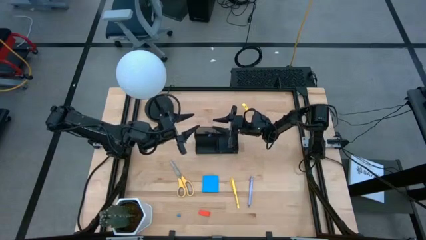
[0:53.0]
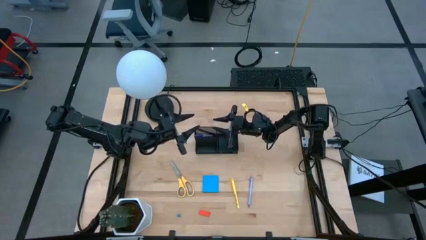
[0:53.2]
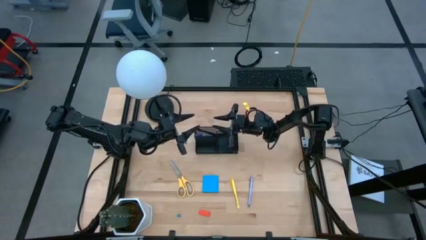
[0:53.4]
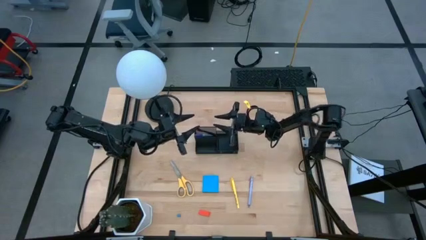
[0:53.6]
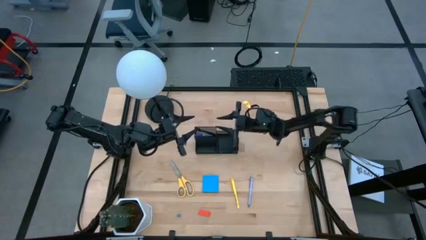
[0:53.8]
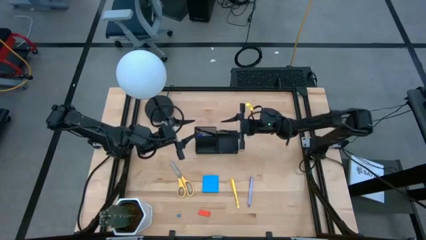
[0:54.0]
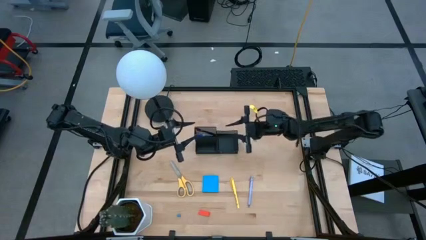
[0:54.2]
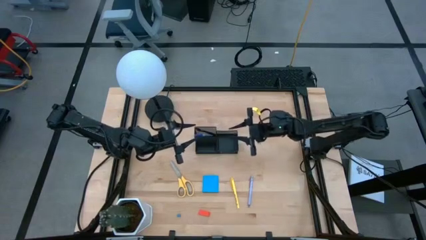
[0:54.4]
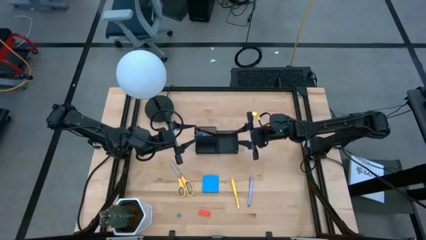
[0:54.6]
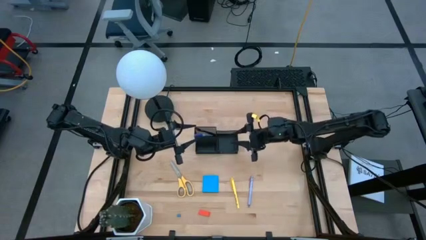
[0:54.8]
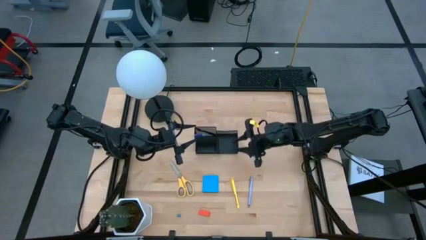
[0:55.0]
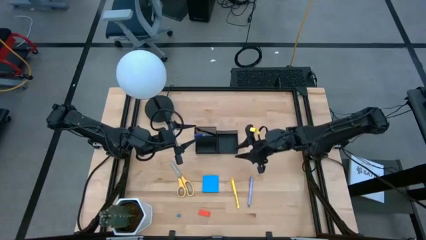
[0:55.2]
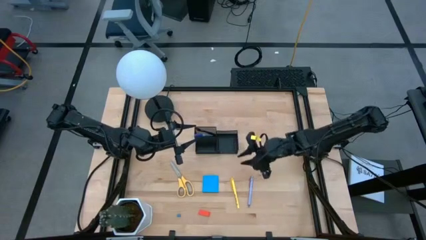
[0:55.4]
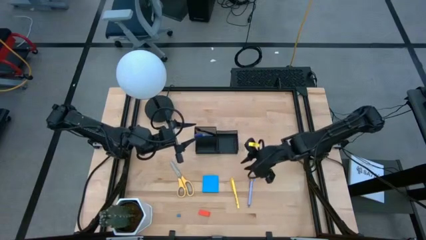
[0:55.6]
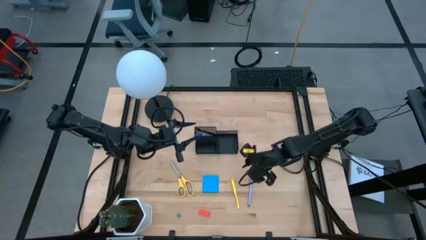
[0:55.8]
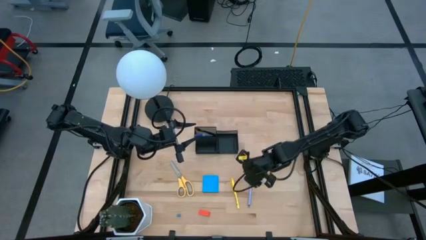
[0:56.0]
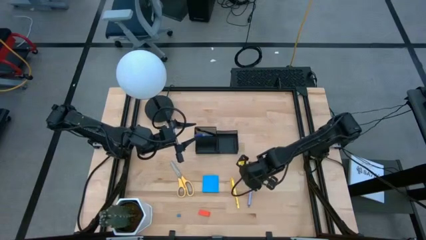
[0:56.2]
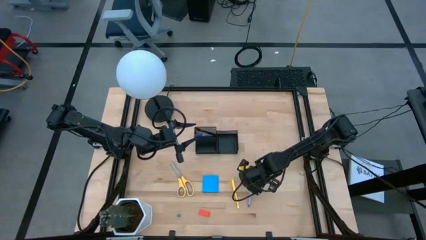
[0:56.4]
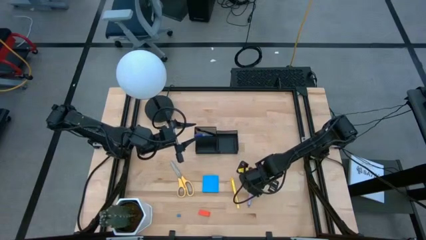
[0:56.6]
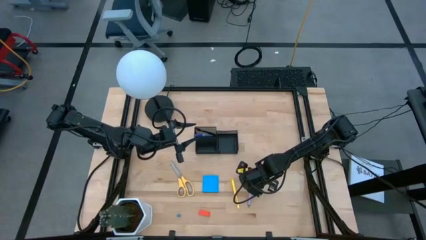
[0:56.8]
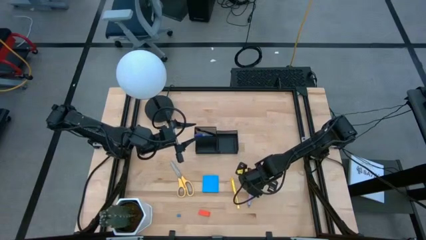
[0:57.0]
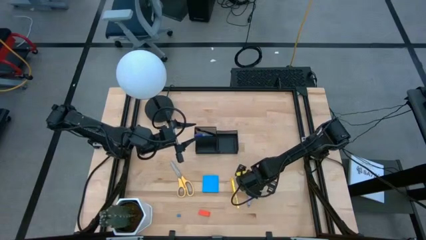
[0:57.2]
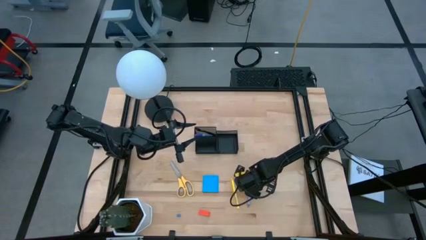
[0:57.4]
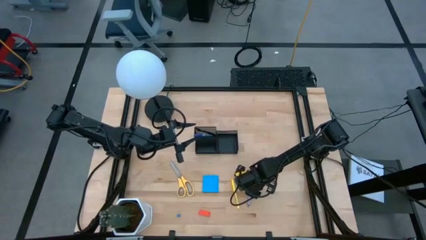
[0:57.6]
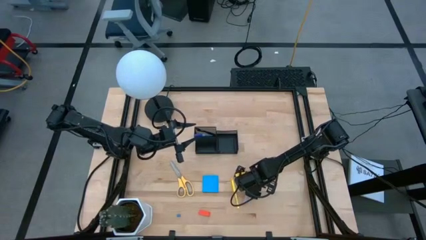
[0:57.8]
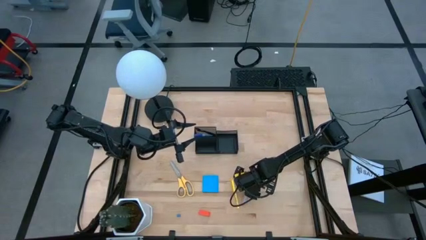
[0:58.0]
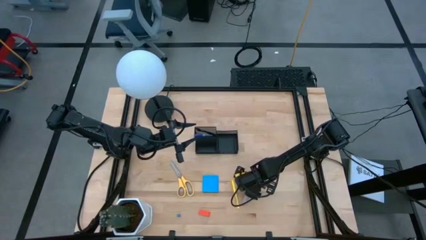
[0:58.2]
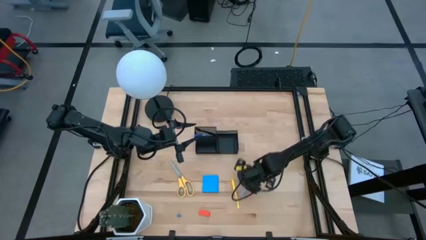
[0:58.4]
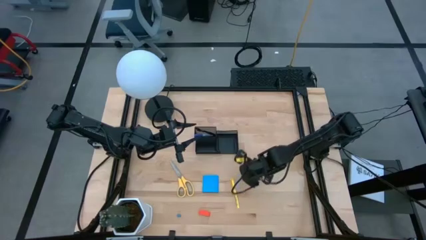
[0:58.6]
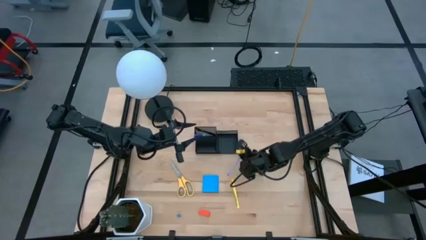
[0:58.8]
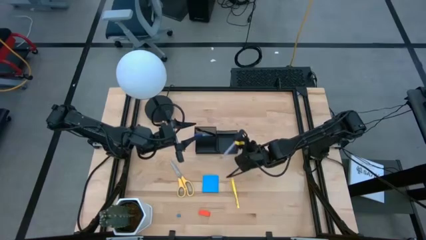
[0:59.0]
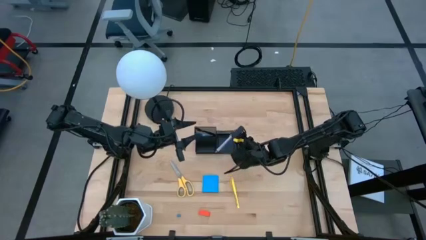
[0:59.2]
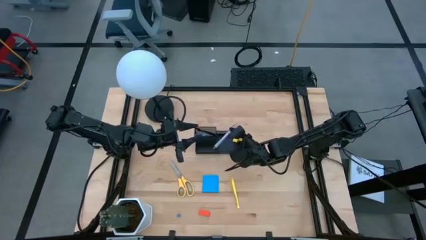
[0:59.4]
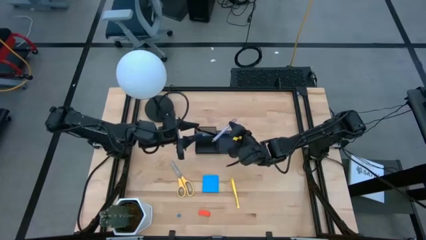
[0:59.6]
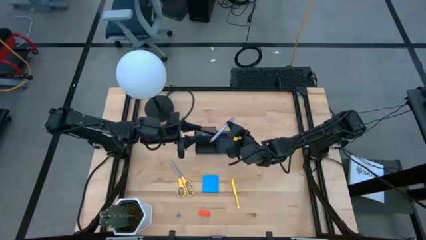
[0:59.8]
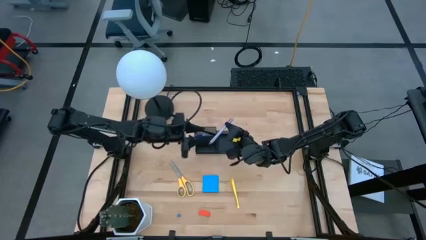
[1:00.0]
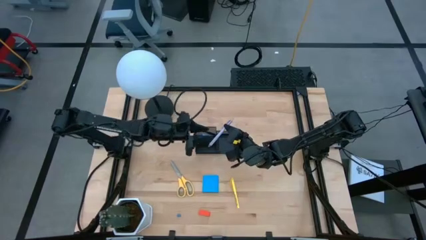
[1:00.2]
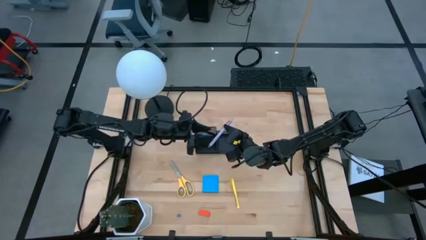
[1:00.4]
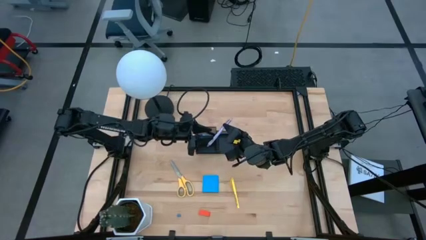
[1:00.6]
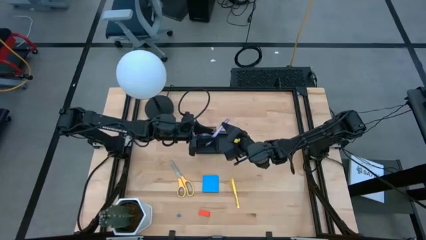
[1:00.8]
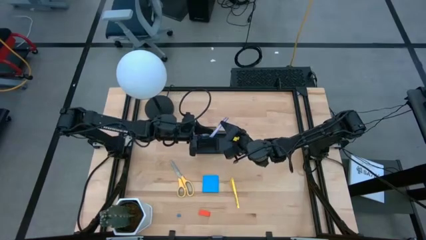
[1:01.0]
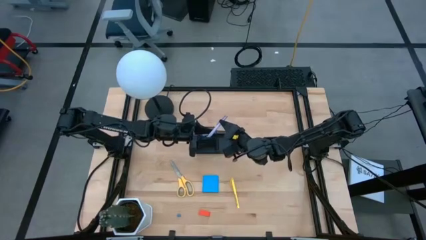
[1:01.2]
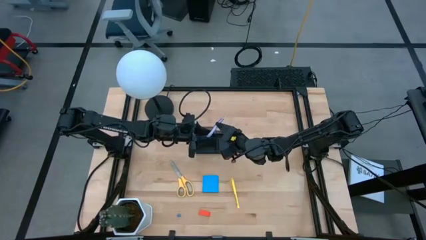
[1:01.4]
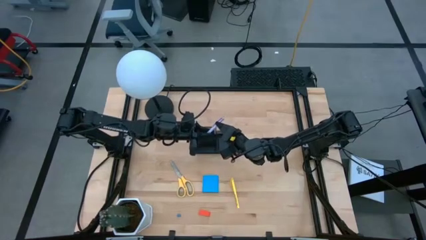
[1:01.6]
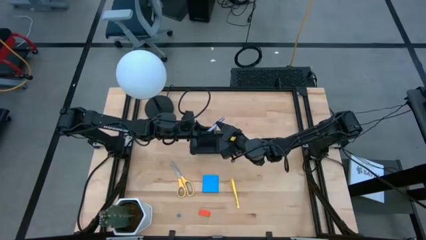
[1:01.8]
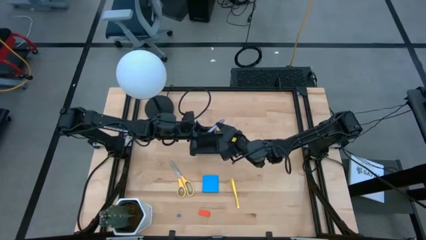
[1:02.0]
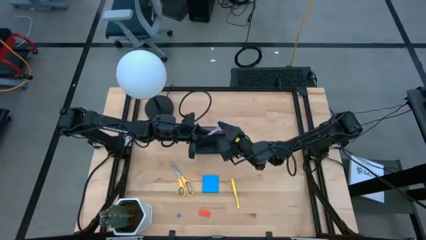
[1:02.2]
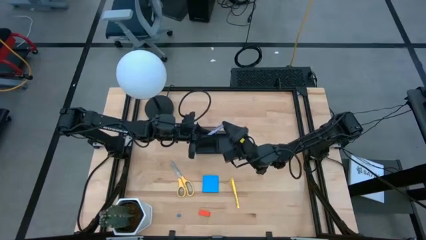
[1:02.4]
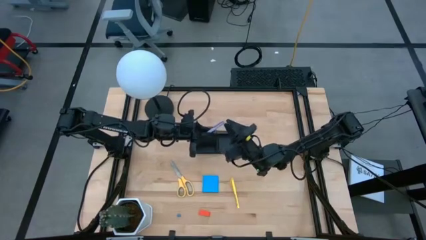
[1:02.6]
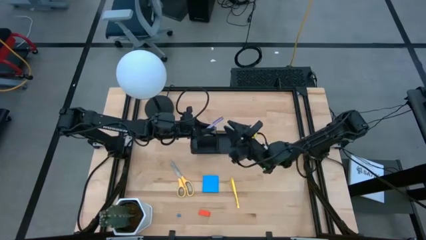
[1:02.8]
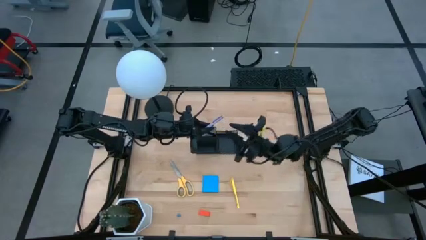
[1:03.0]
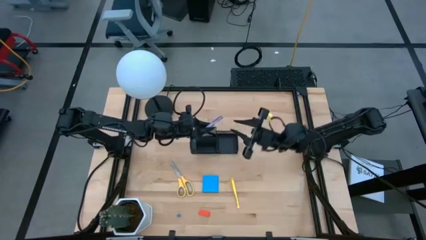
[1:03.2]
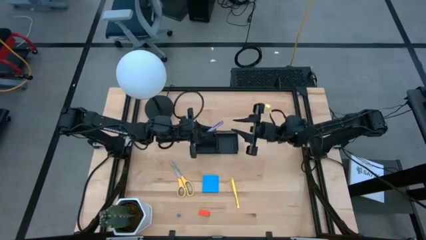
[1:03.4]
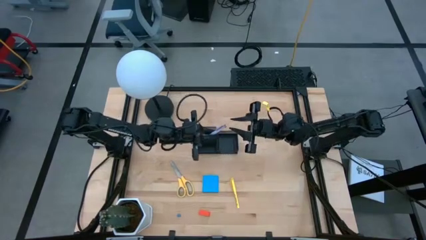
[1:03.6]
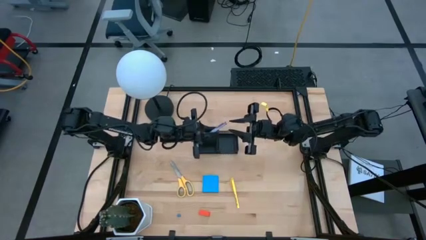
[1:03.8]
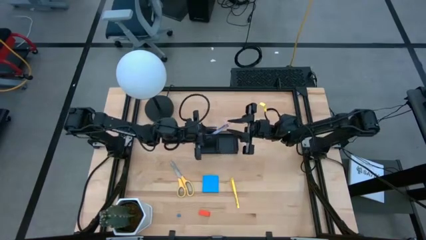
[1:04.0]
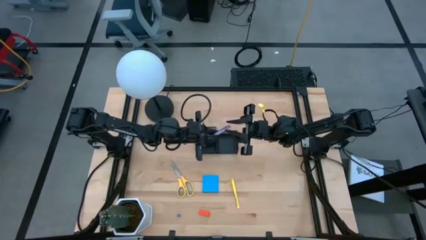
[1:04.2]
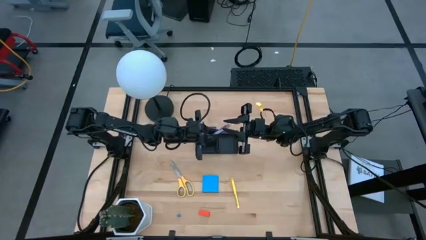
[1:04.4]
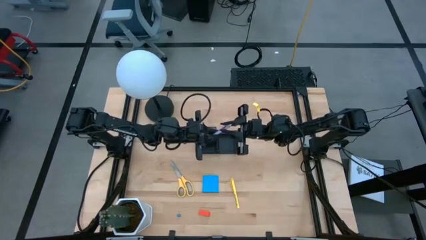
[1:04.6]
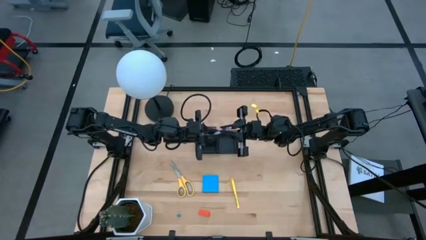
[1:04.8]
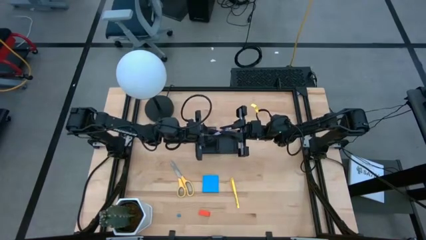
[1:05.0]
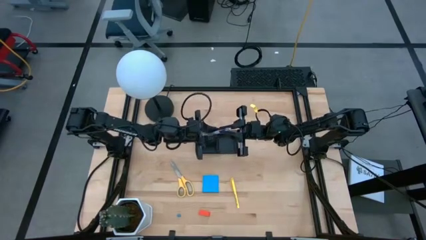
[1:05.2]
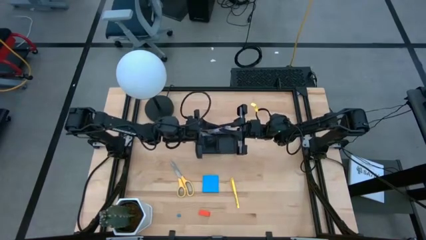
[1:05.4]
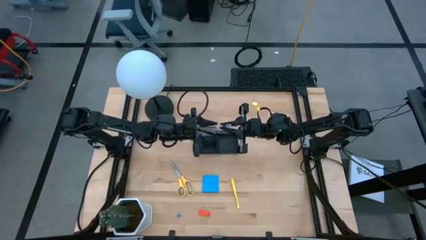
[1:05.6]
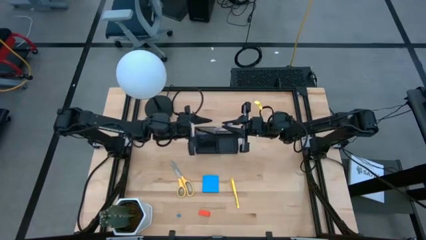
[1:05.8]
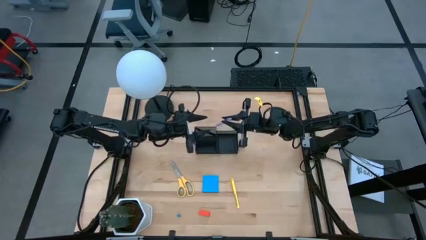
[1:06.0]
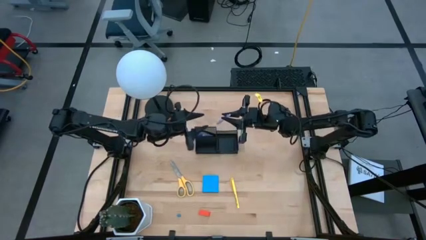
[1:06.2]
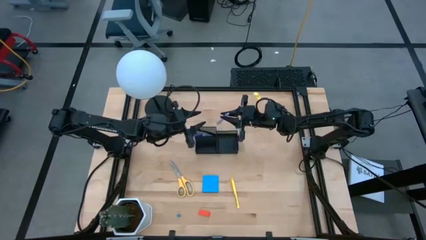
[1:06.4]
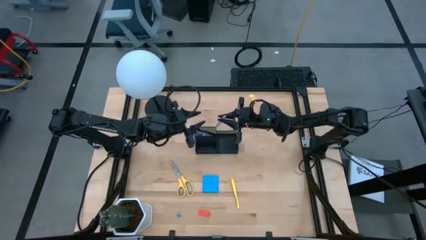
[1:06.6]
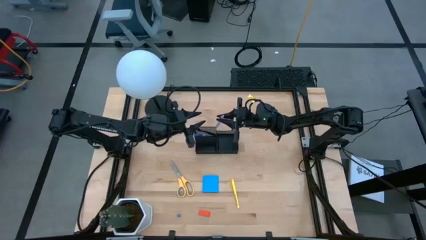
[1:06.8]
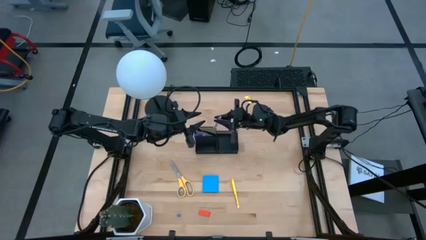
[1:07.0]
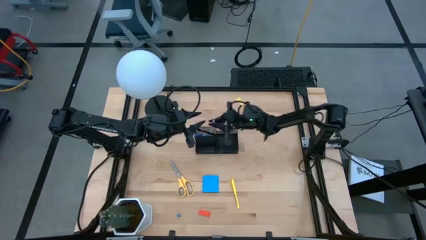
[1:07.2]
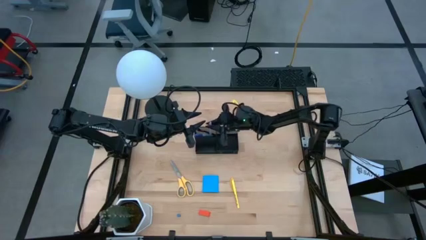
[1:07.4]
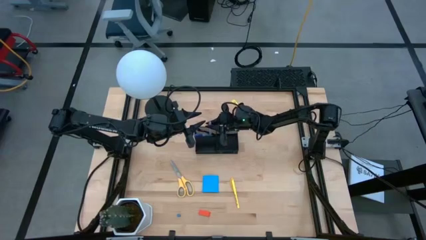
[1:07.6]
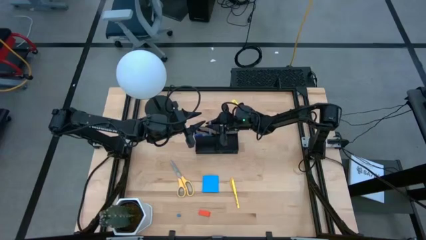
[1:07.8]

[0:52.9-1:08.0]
Task: Pick and place office supplies into organizer
Put the violet pen into the desk organizer

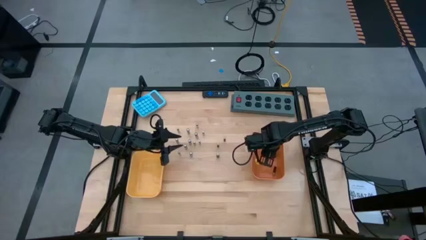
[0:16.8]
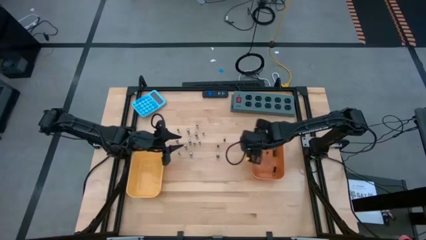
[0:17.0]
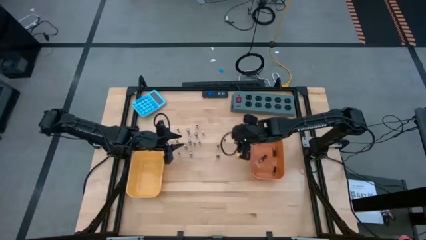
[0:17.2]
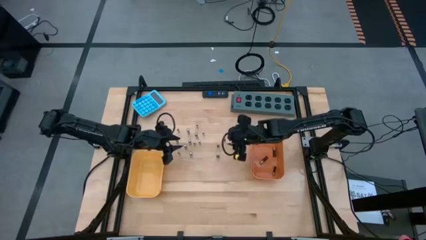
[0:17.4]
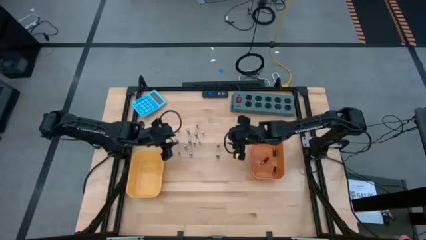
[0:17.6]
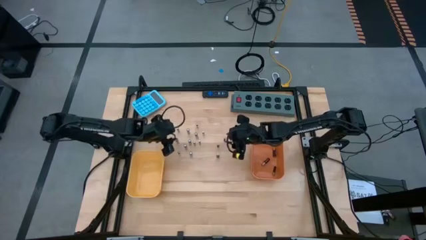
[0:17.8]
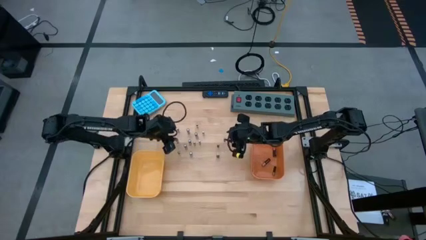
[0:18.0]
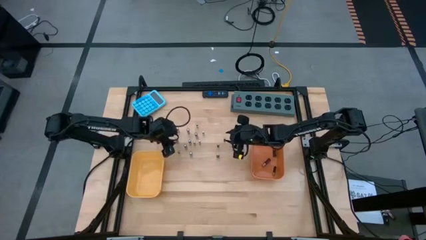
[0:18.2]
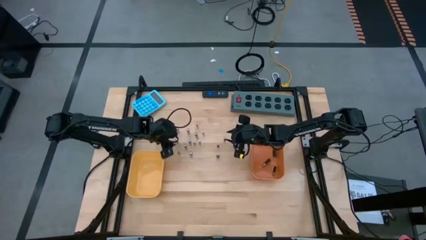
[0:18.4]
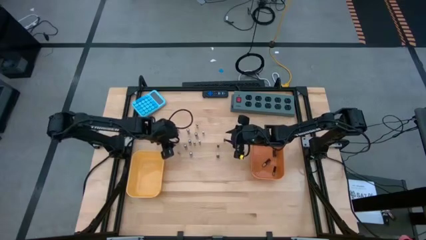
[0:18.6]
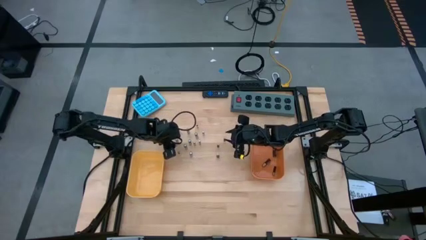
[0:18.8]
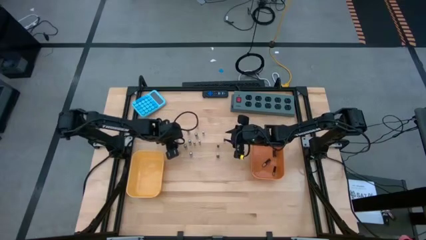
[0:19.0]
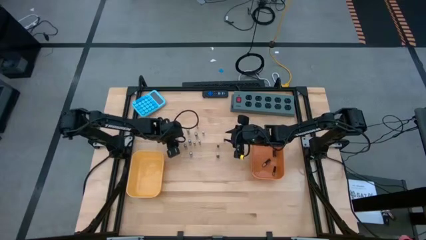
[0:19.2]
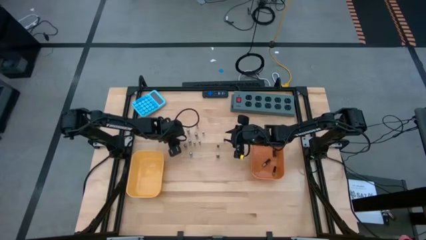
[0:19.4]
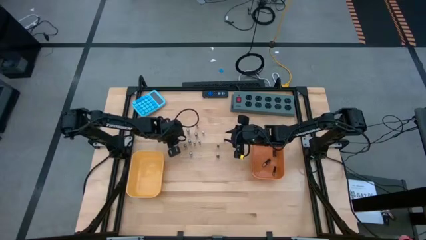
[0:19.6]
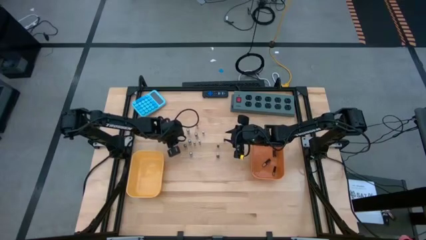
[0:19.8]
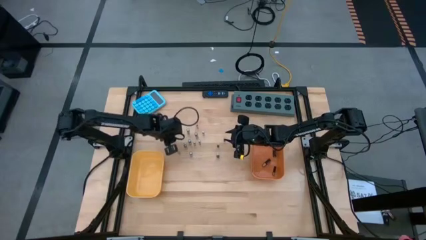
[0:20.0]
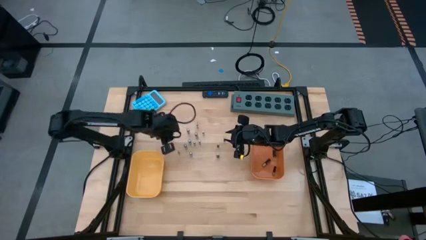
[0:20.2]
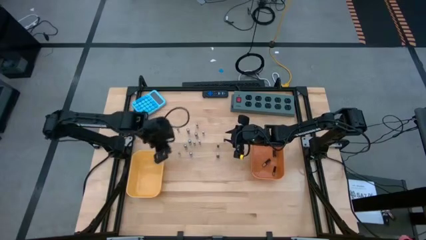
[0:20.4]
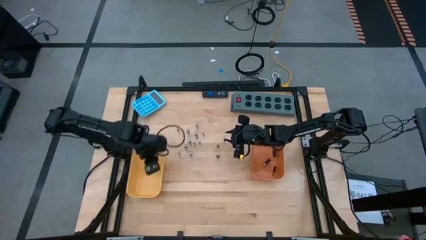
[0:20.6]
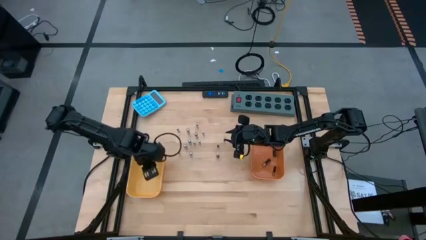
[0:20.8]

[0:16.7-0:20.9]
Task: Sort batteries
Put the silver battery into the yellow bin
